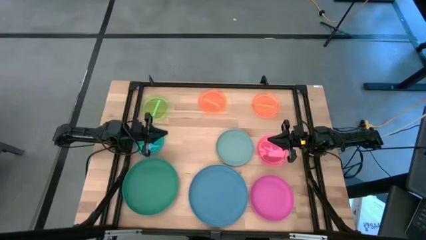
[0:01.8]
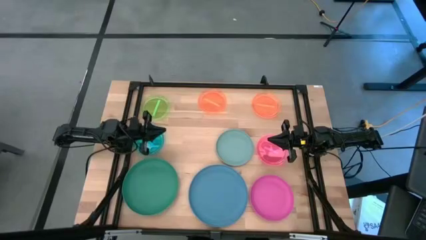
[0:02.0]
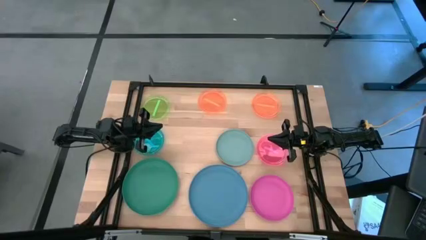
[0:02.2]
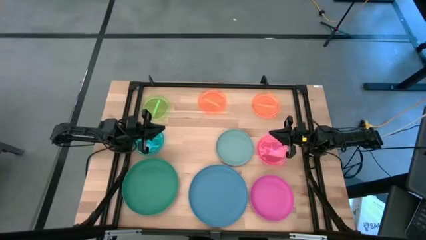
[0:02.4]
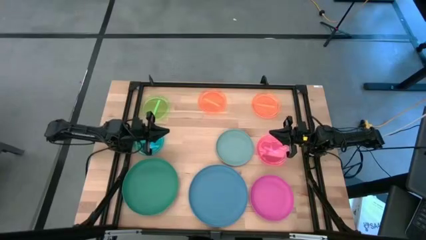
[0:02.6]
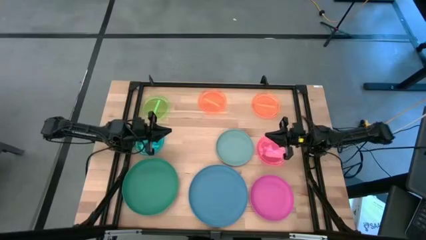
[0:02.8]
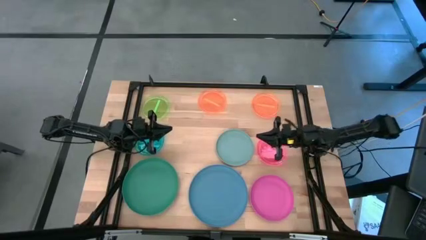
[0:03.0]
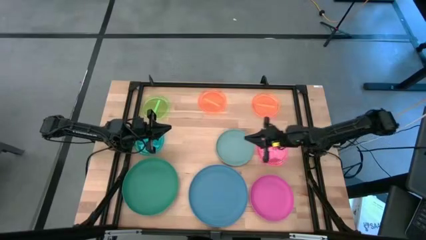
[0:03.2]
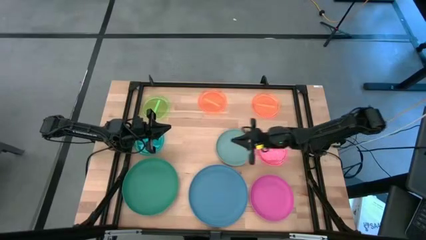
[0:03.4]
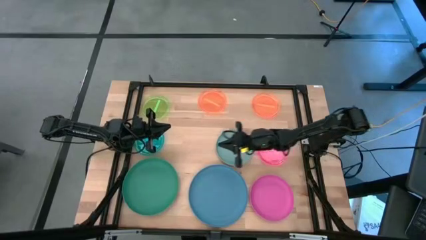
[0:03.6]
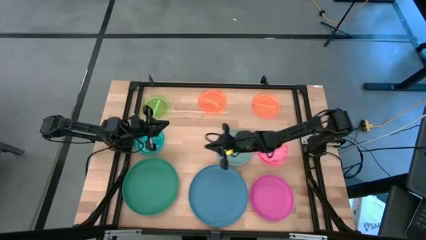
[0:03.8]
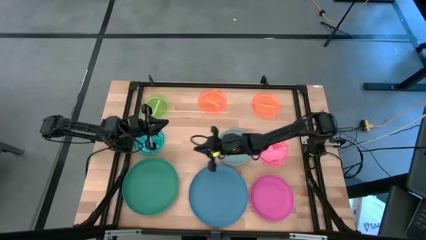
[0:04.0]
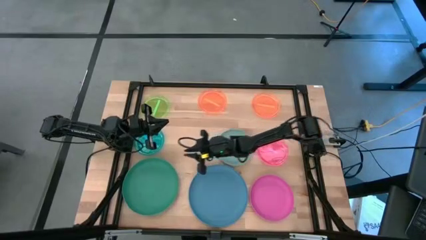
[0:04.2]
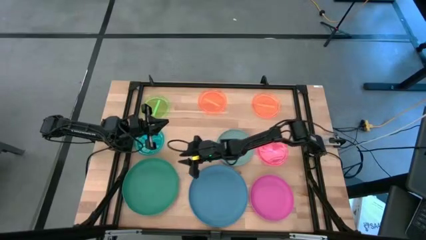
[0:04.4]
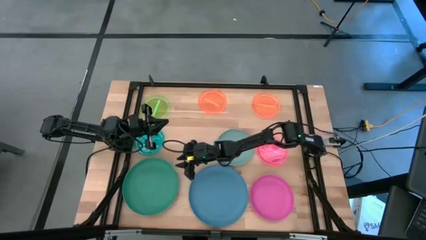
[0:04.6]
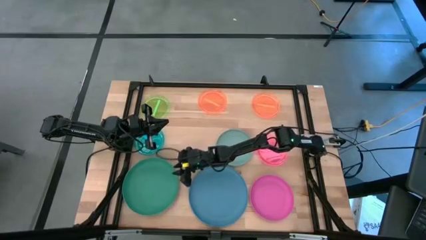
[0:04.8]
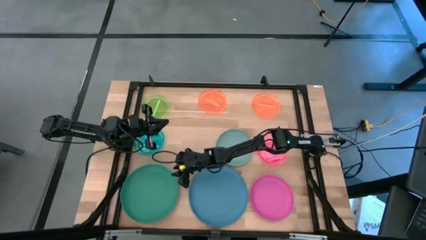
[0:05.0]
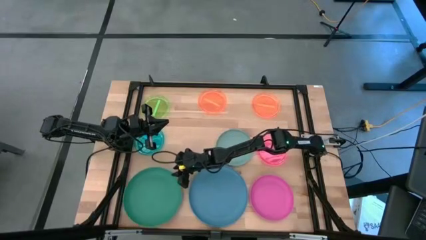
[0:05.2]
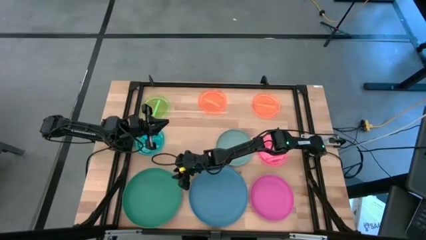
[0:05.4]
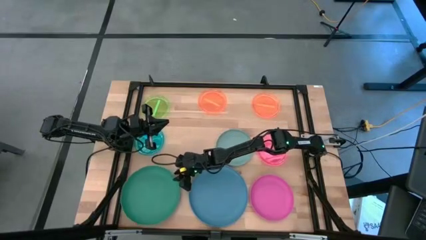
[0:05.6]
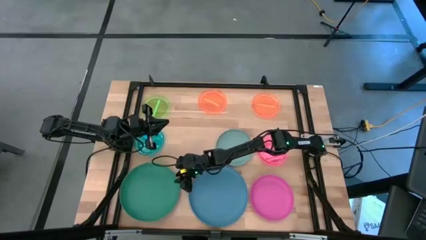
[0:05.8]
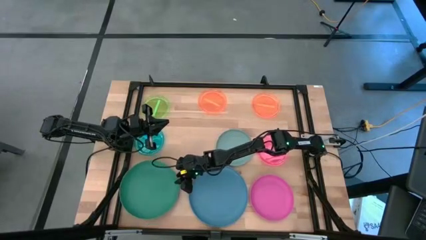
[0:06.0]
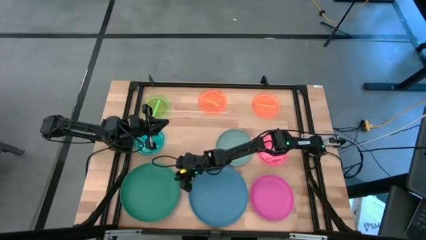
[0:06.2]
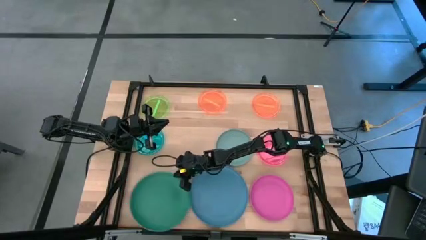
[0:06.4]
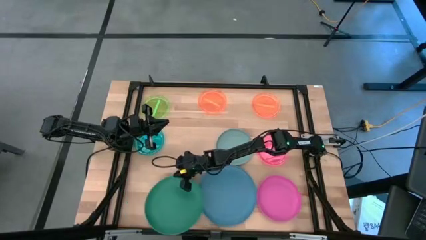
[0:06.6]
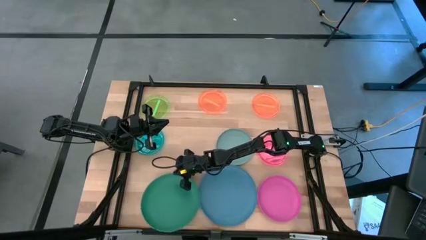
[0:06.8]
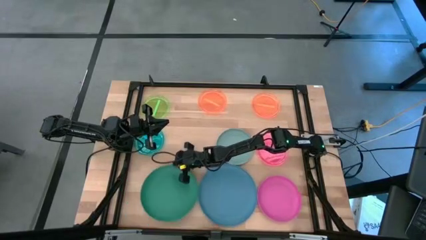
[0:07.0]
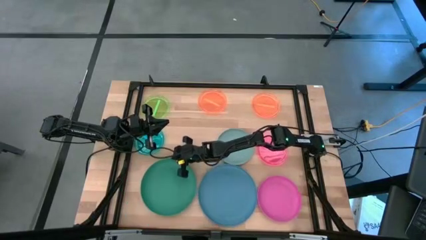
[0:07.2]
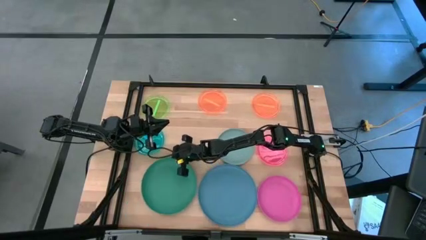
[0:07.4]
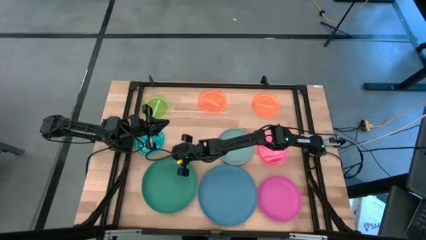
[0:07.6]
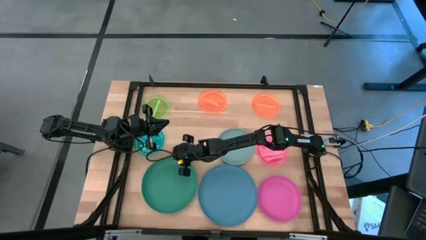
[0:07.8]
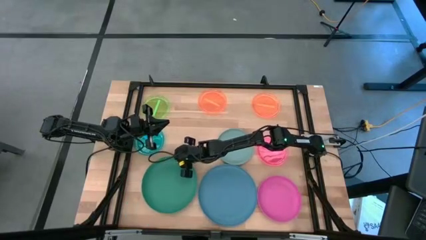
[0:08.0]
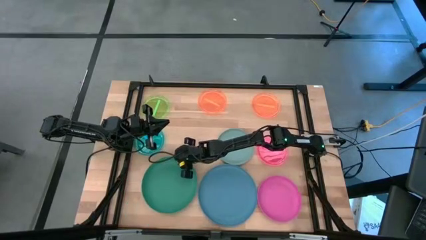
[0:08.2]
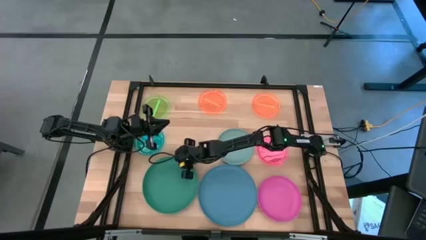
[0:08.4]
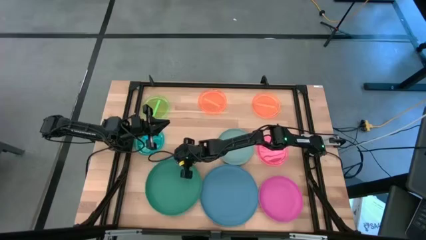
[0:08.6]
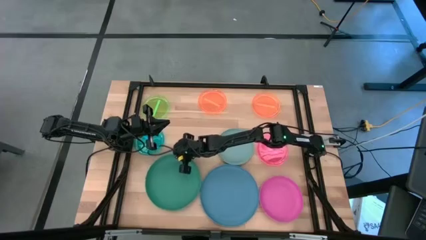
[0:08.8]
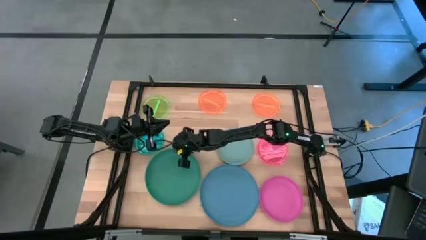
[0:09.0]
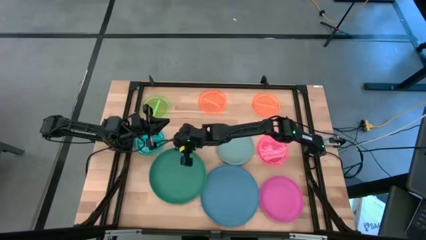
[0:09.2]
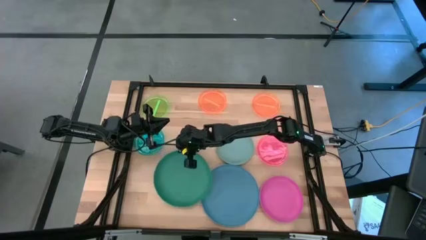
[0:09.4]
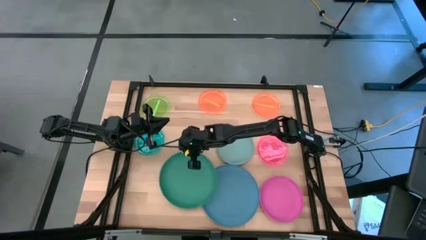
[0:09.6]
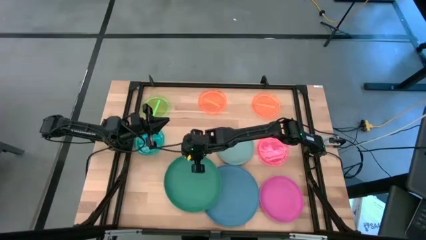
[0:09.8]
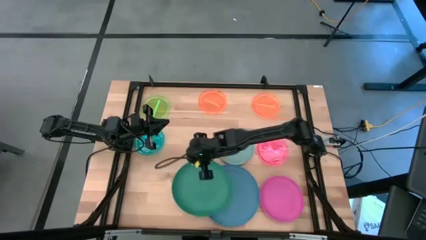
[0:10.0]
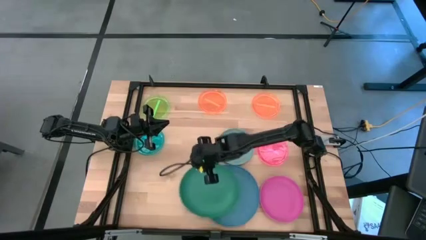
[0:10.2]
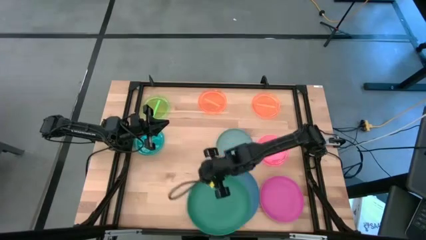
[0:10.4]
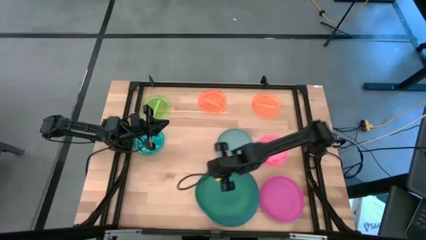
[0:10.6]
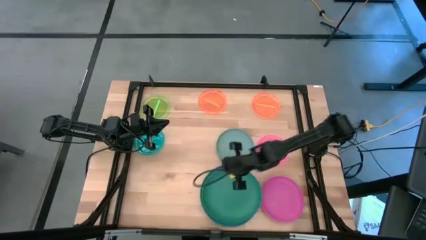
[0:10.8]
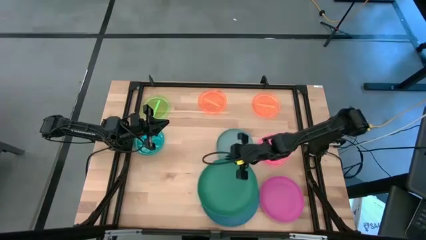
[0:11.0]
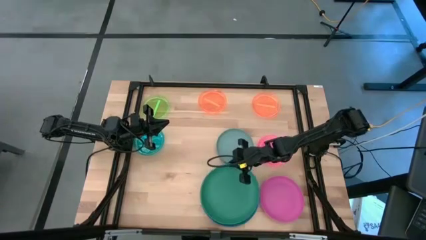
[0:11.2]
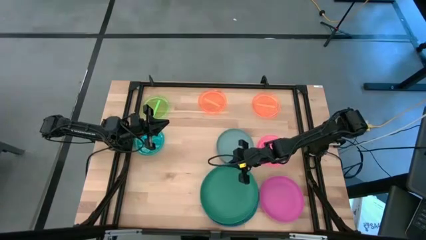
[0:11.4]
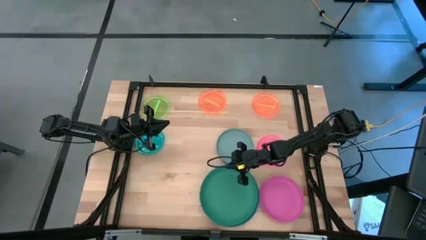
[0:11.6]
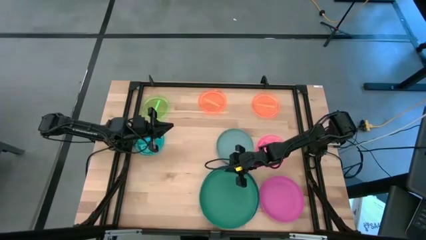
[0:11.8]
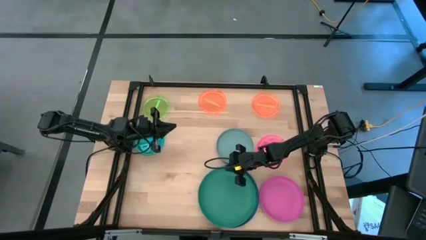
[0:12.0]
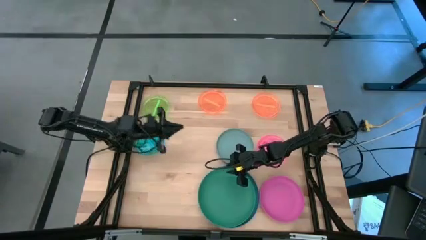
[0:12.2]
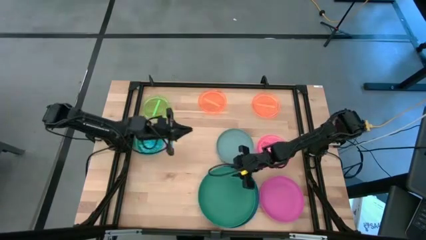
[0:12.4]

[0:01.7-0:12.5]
Task: Stack plastic plates
Stack the green plate on top of the blue plate

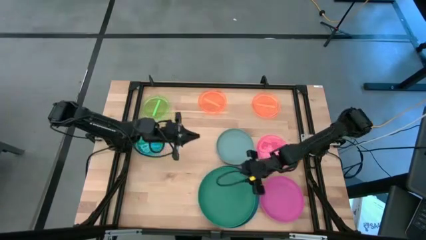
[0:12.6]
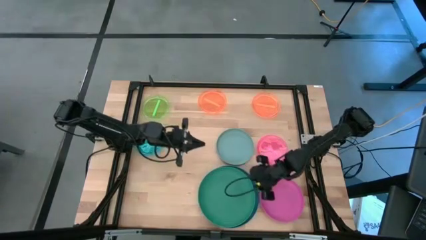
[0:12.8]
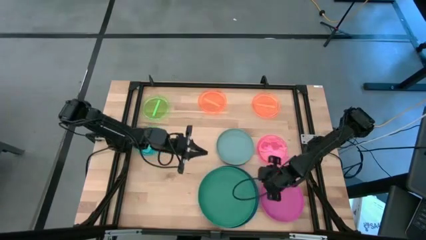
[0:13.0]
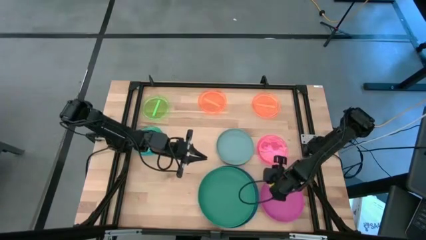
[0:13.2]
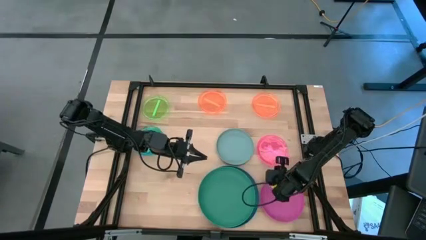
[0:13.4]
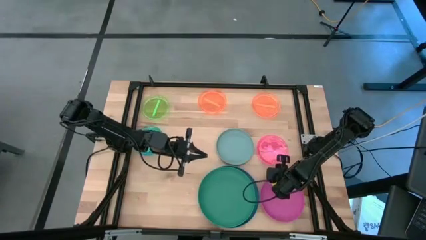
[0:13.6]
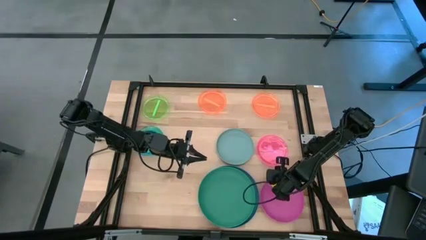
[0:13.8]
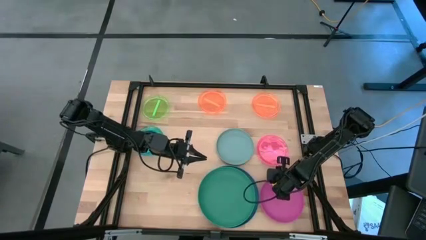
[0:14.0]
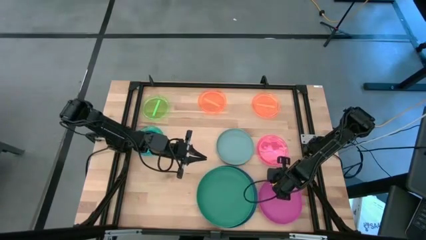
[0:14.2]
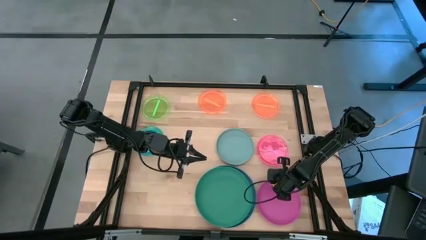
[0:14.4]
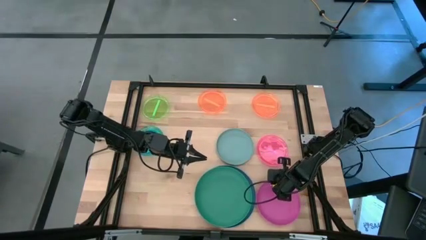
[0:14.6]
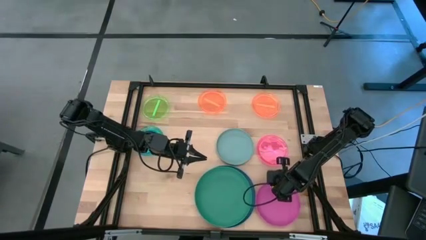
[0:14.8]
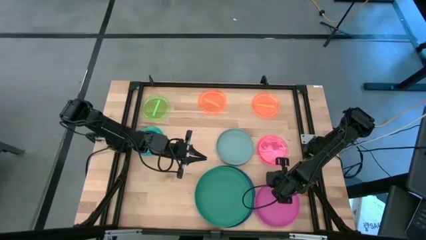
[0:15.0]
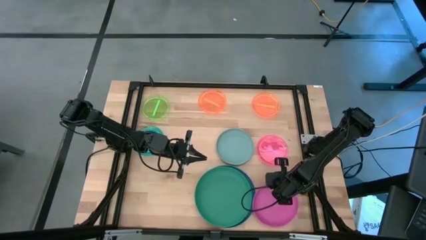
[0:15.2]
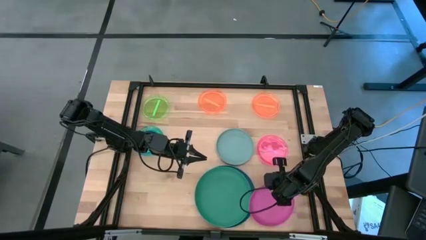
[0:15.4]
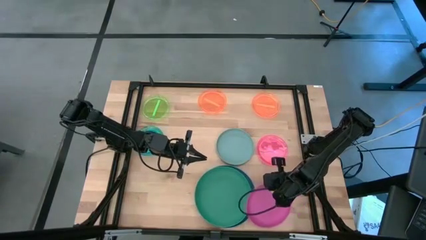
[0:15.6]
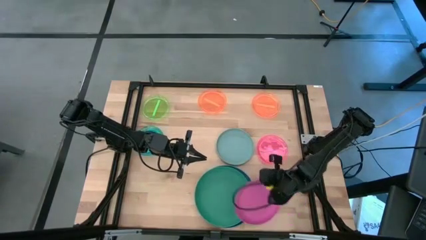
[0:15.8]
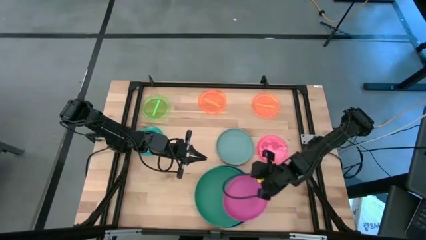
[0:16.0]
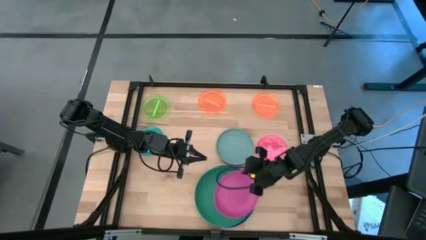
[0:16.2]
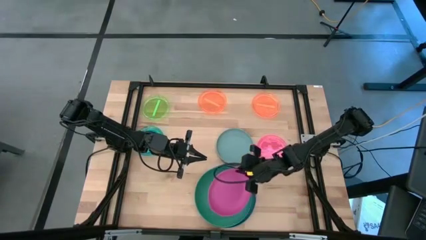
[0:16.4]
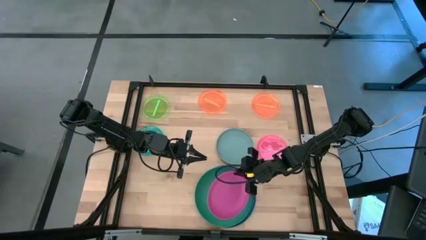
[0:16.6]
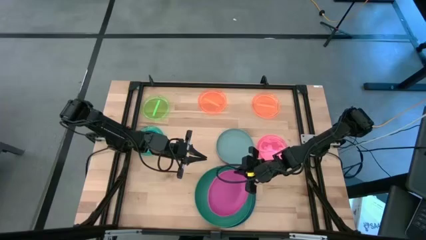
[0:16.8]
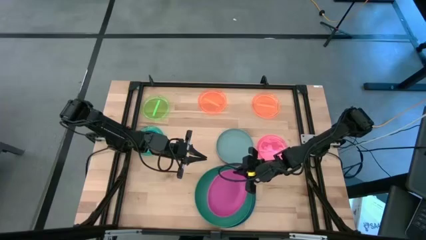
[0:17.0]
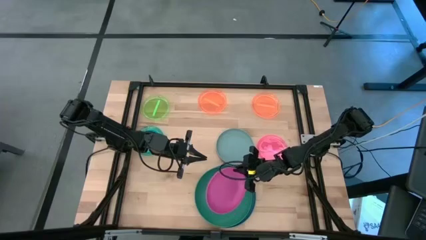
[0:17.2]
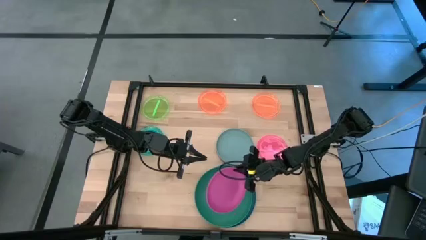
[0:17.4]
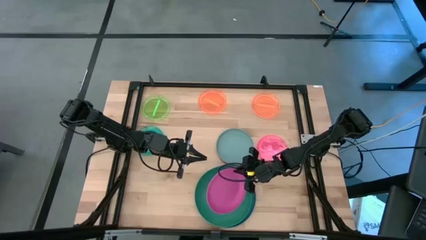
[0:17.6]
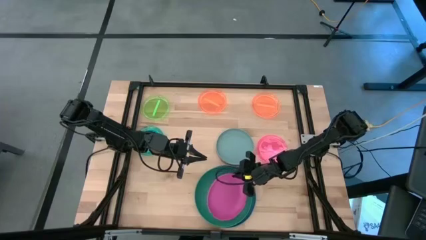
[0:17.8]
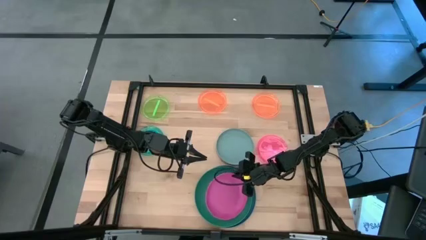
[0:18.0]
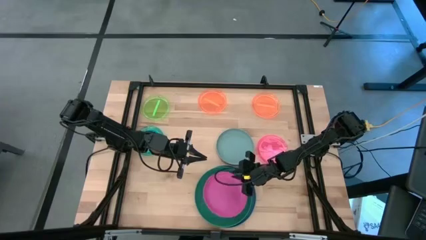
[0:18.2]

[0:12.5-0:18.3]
Stack the pink plate on top of the green plate
